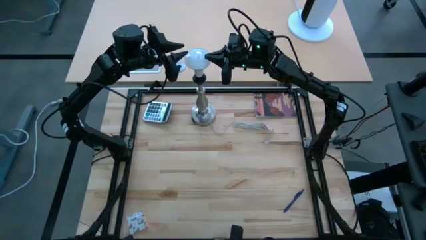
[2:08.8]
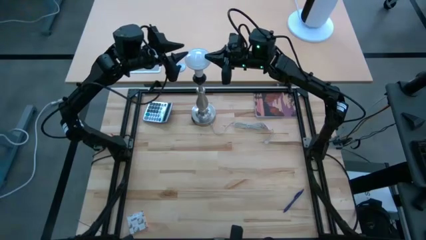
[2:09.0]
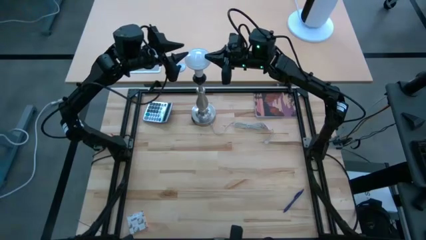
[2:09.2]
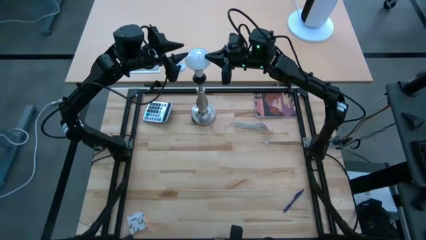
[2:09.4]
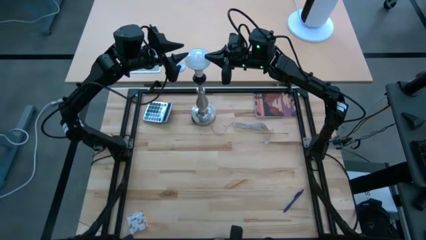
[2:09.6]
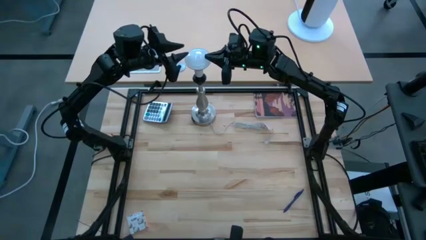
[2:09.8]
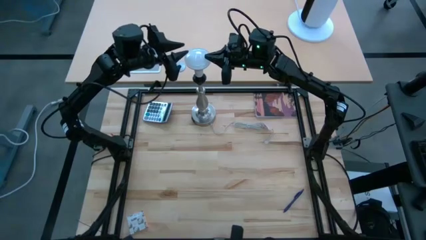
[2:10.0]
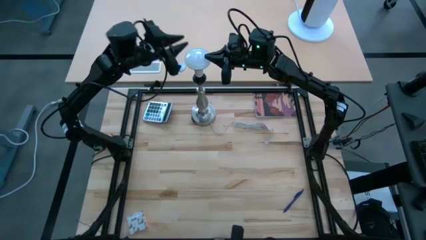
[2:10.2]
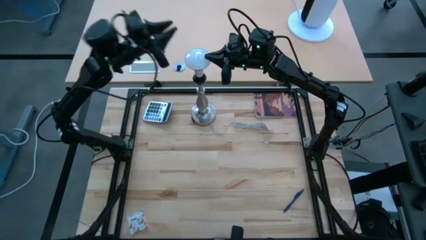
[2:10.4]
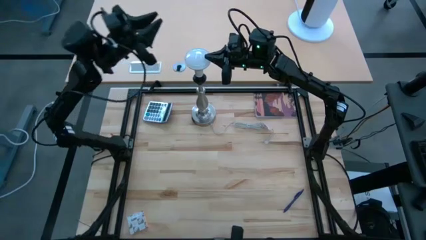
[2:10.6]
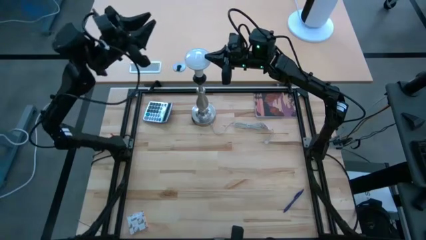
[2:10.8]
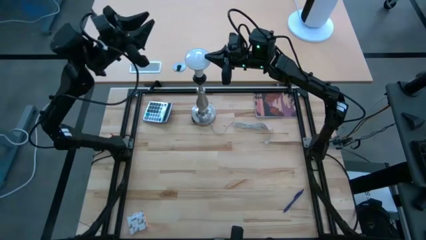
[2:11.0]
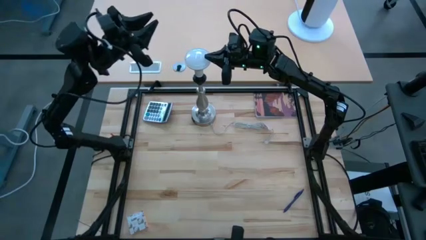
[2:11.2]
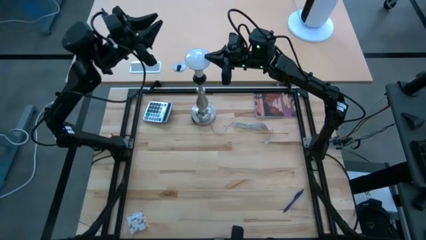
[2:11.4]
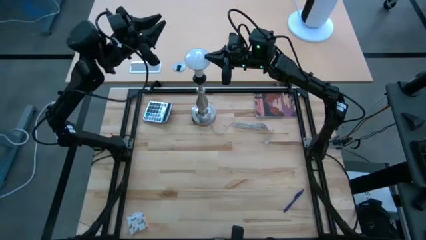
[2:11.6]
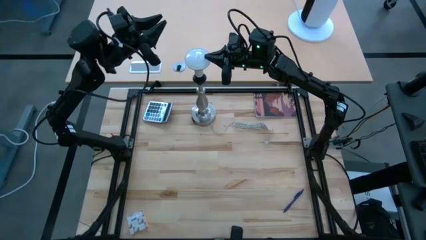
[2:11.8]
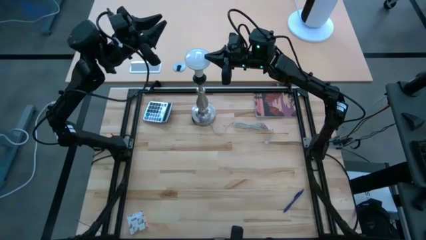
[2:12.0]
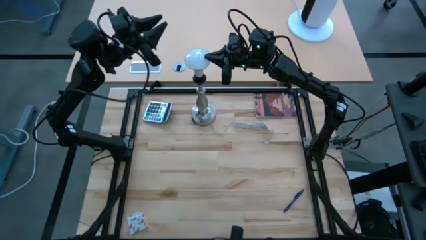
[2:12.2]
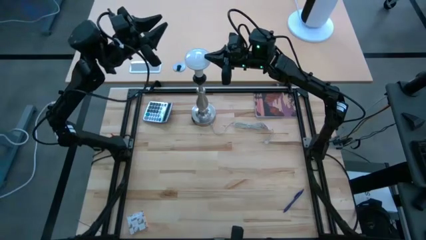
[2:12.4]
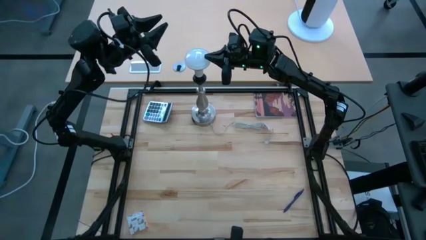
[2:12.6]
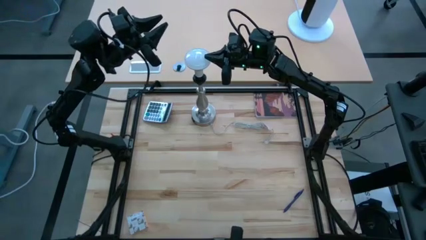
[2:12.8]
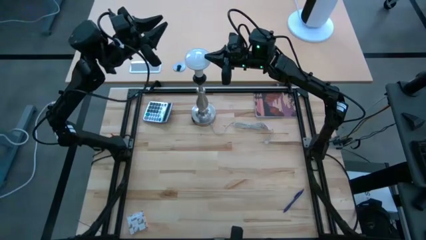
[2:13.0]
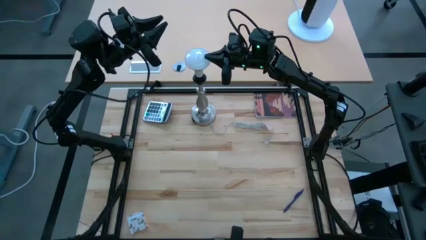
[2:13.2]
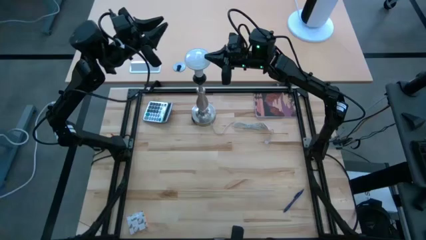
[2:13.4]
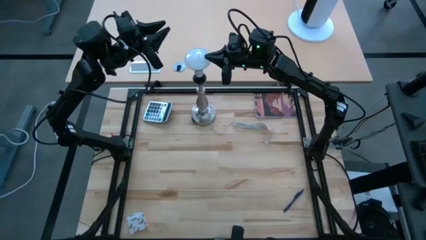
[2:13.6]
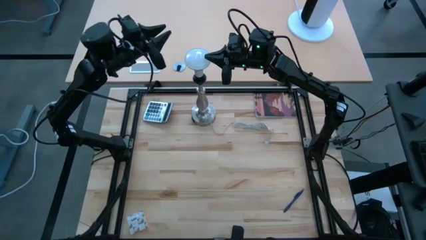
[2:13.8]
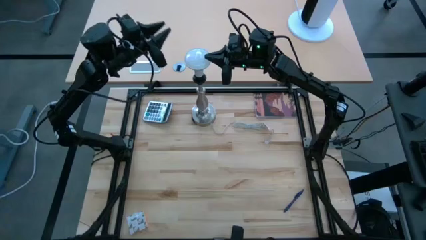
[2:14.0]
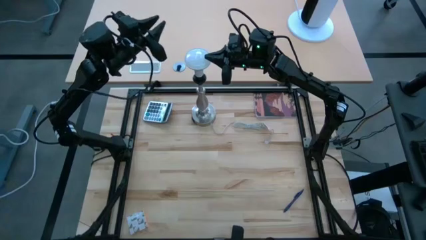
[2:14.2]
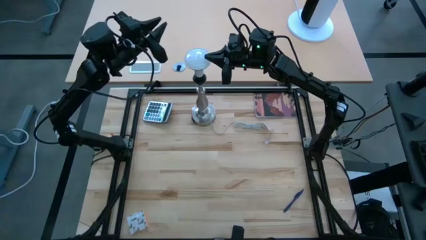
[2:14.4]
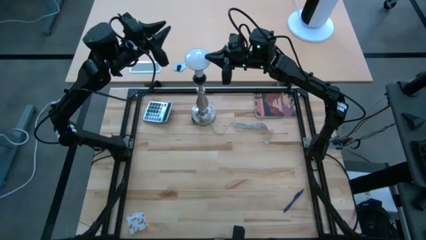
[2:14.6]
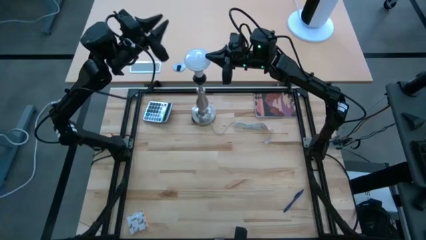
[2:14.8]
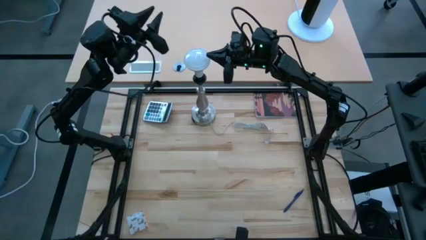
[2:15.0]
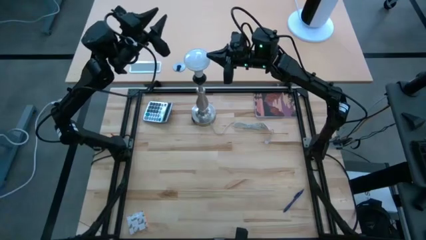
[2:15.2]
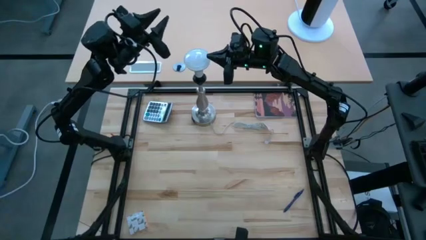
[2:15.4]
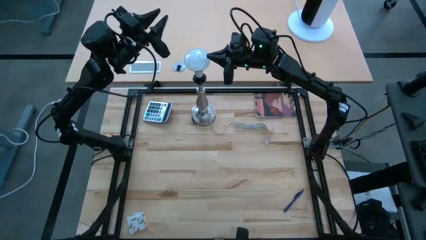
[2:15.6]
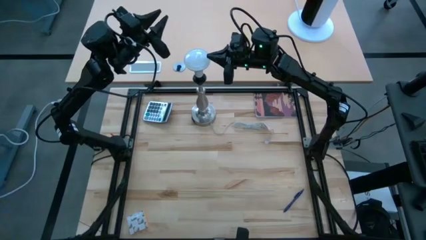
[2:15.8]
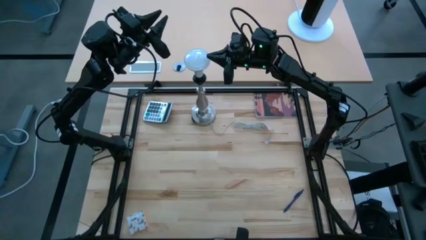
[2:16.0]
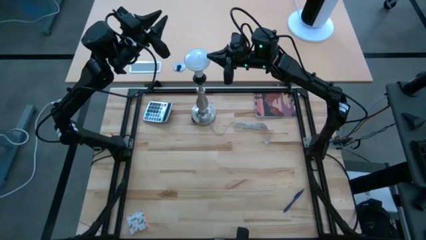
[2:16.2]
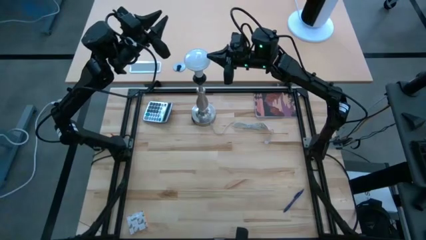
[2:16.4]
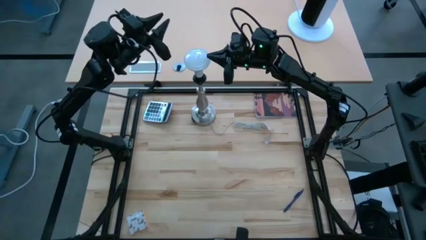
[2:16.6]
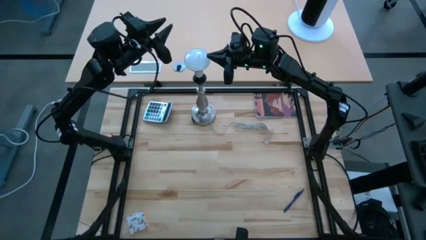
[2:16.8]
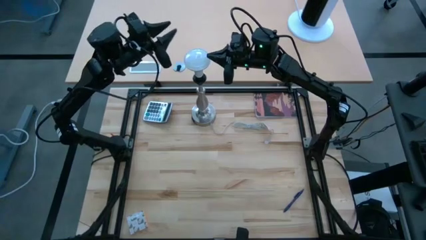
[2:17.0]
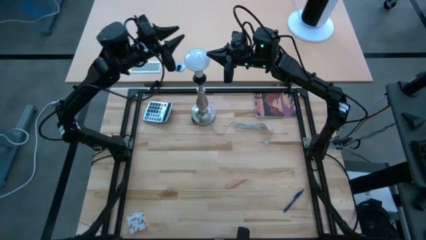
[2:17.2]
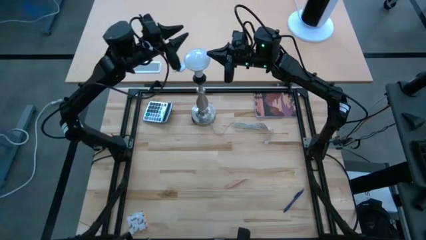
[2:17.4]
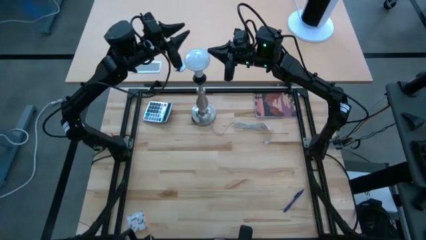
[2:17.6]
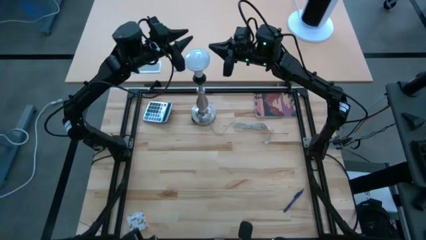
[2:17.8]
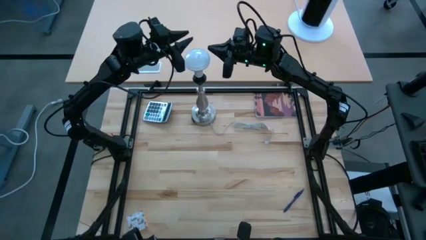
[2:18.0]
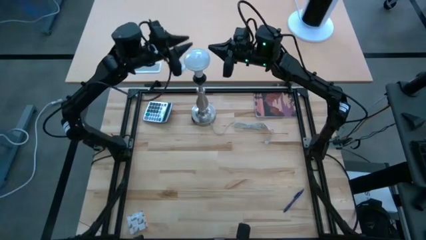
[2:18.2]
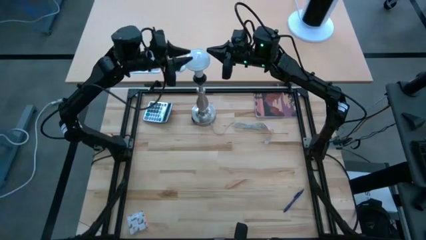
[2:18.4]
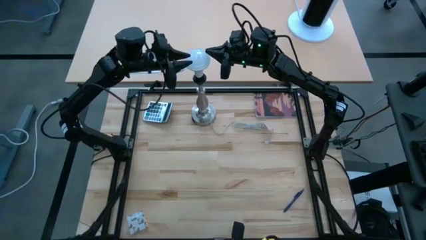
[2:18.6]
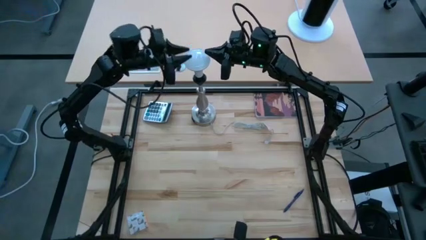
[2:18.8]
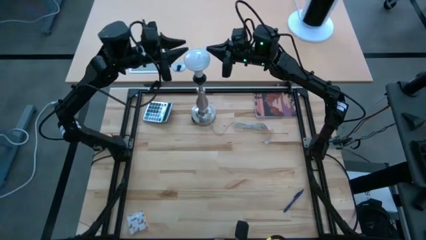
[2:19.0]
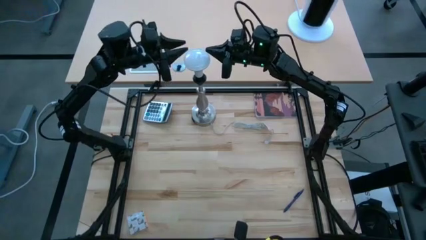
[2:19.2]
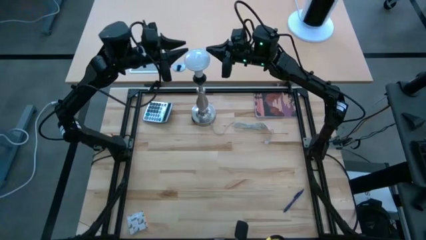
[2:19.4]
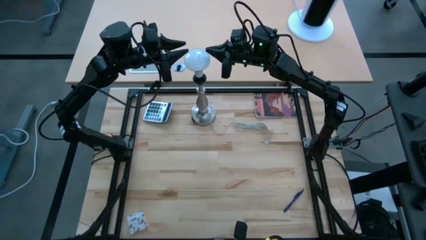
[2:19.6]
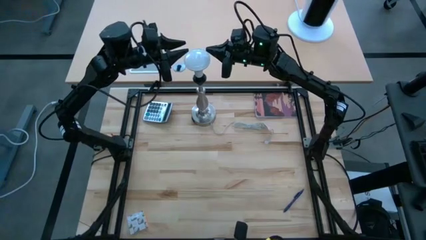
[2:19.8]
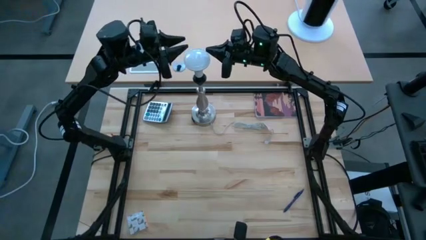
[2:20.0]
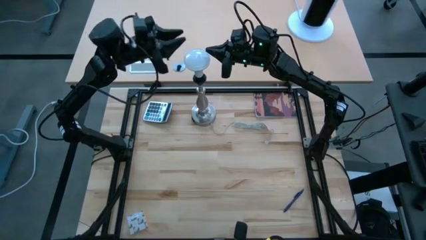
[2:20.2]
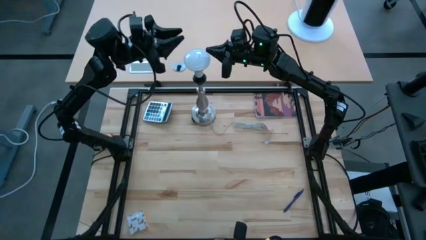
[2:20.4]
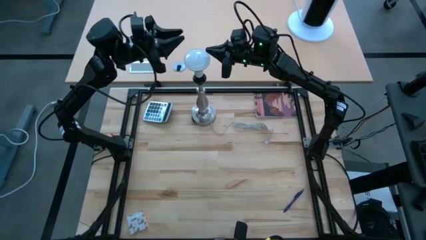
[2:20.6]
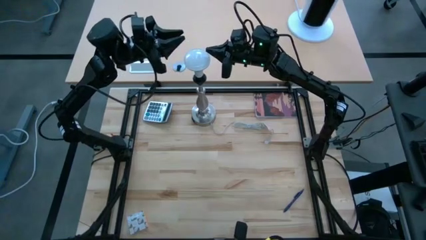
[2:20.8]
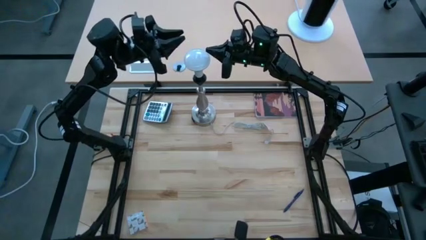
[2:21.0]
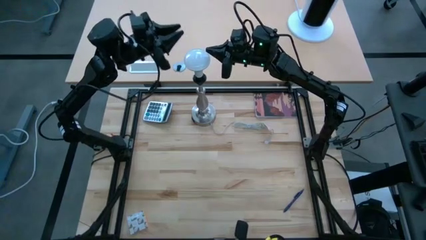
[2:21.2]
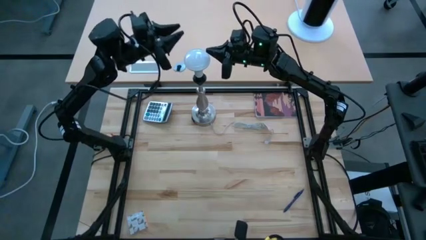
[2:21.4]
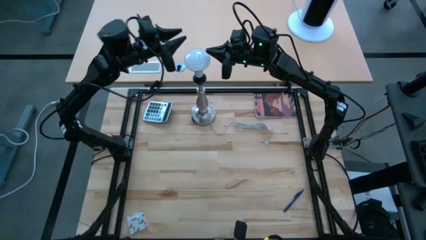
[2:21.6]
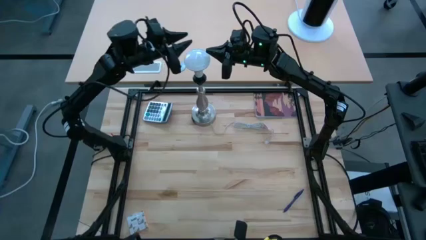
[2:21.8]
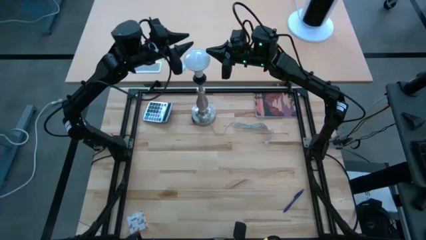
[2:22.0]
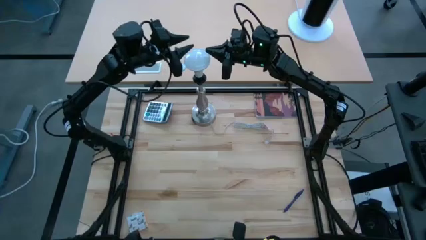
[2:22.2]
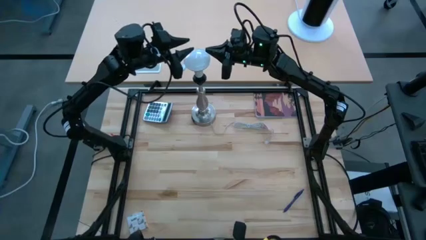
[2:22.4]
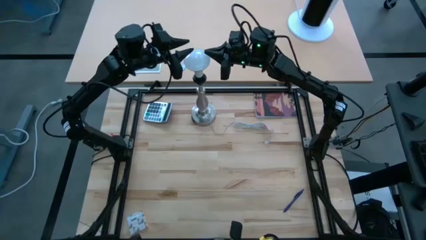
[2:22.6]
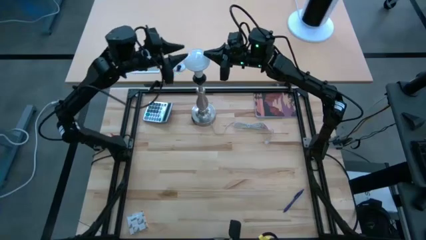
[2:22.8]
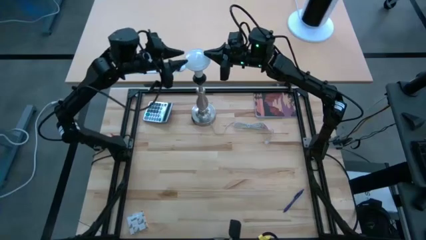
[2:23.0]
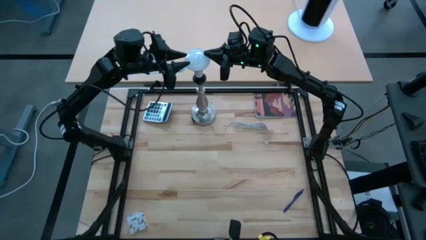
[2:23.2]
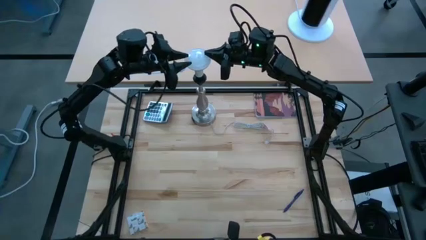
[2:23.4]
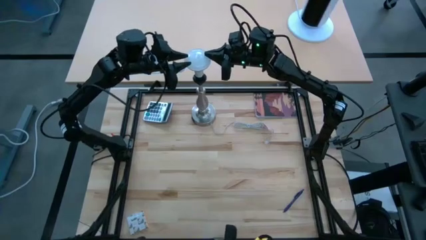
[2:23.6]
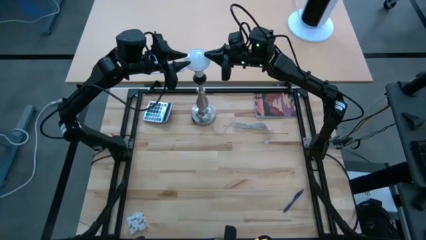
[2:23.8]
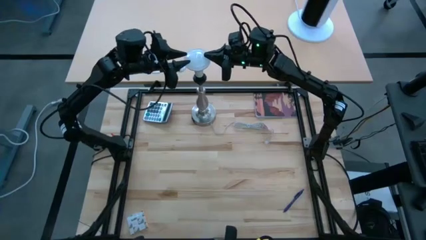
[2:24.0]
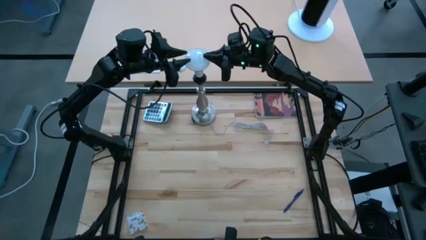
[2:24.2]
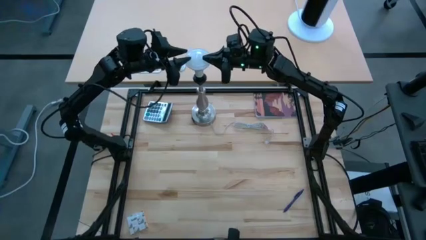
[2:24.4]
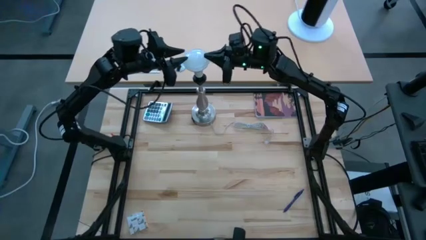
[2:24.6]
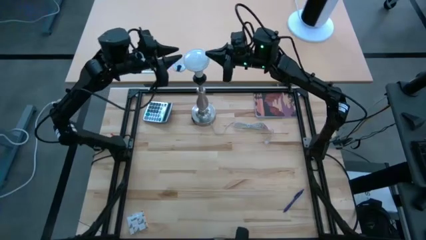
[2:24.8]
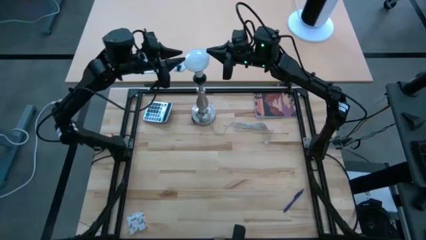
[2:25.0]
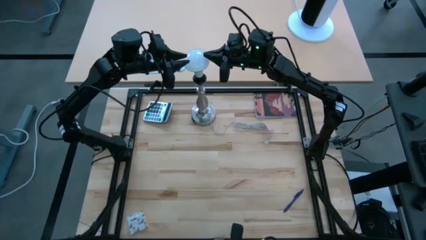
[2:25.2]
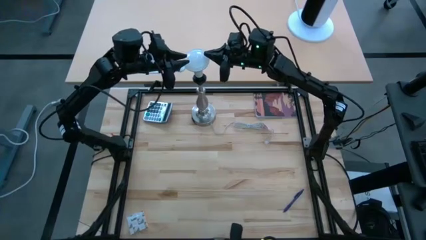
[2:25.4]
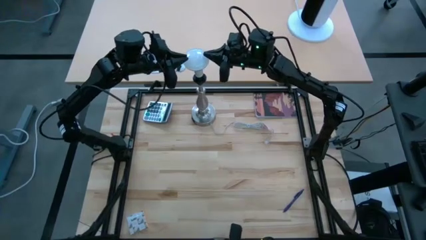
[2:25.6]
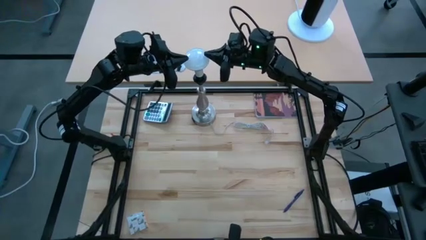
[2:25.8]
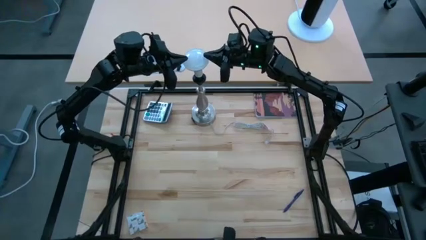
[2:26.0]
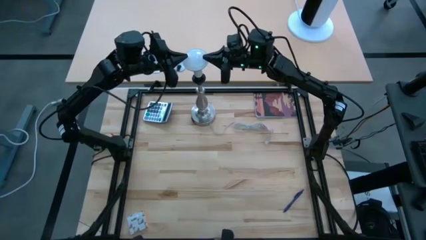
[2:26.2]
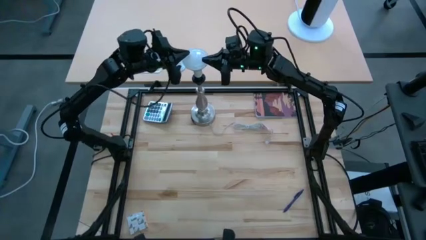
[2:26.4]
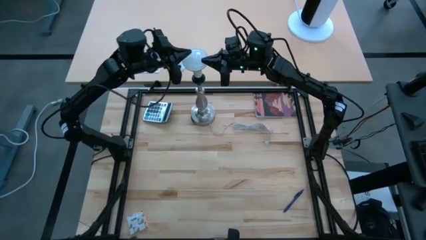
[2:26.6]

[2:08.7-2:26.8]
Task: Screw lightbulb
Insert the lightbulb into the table lamp
